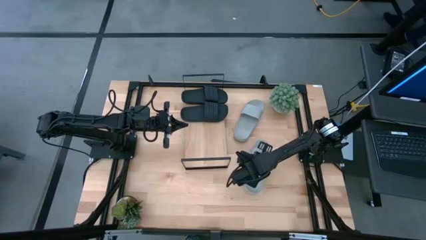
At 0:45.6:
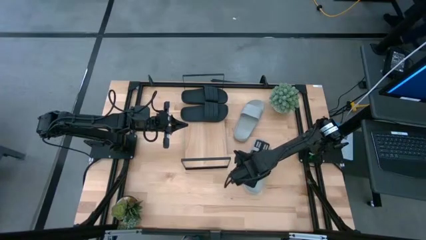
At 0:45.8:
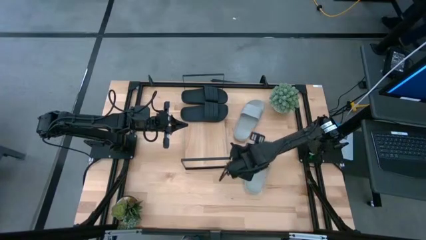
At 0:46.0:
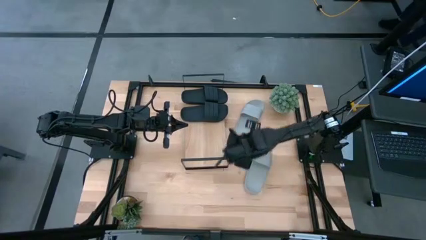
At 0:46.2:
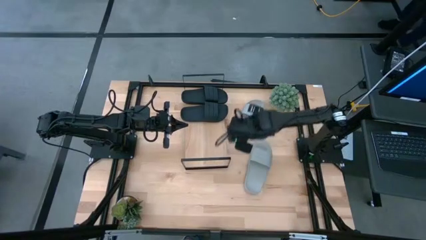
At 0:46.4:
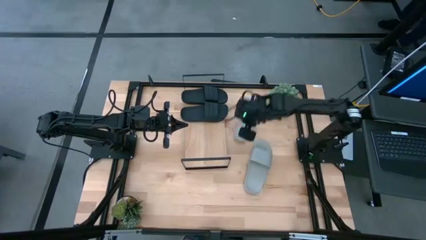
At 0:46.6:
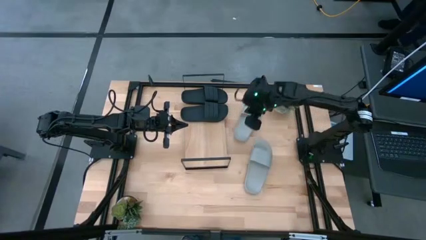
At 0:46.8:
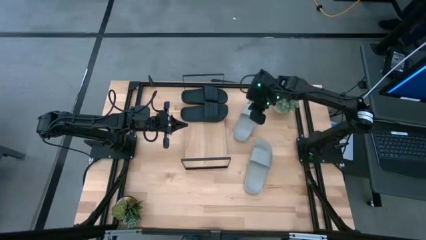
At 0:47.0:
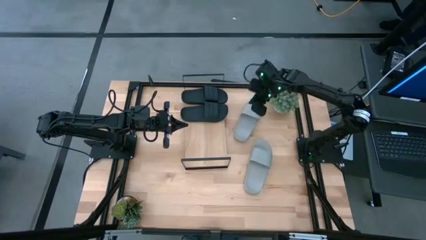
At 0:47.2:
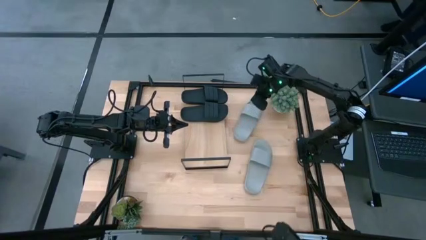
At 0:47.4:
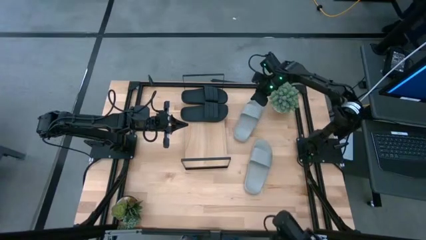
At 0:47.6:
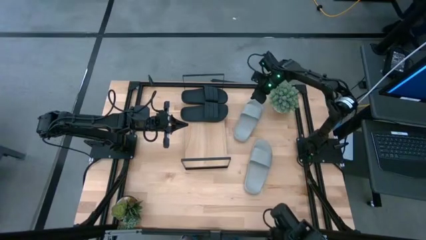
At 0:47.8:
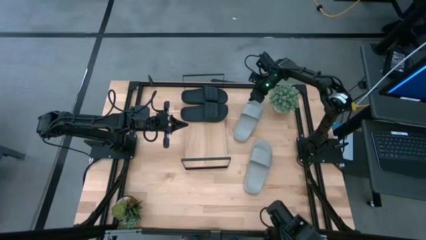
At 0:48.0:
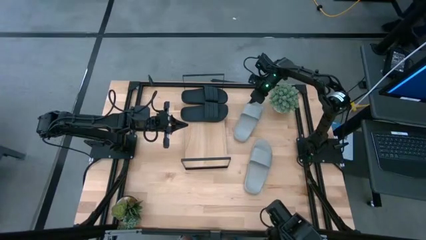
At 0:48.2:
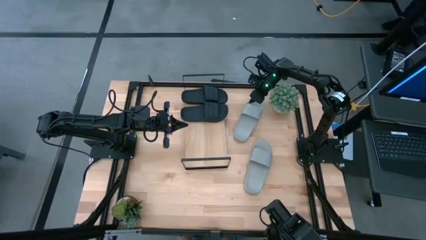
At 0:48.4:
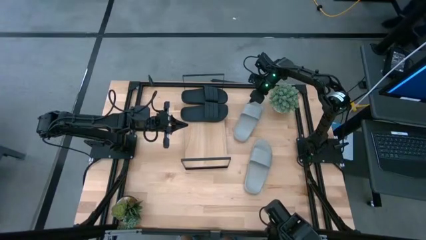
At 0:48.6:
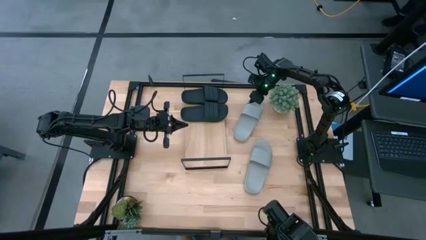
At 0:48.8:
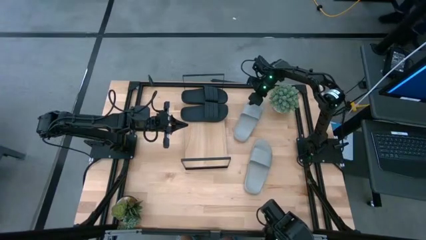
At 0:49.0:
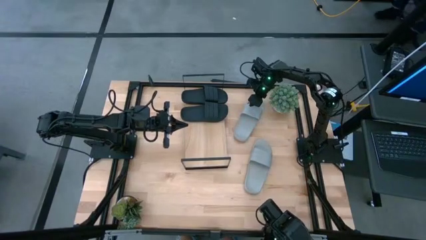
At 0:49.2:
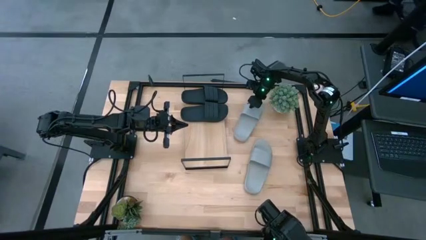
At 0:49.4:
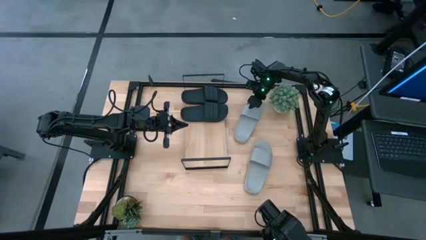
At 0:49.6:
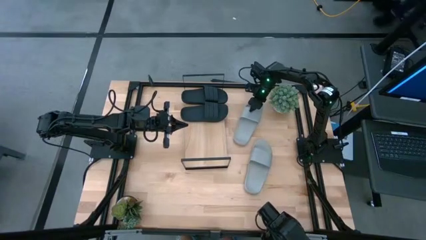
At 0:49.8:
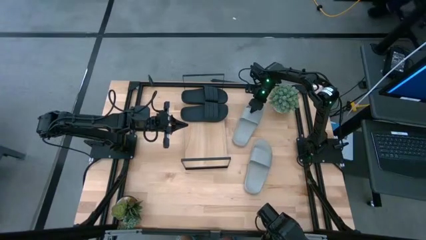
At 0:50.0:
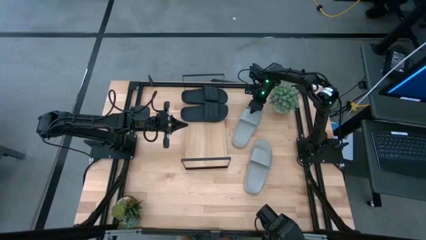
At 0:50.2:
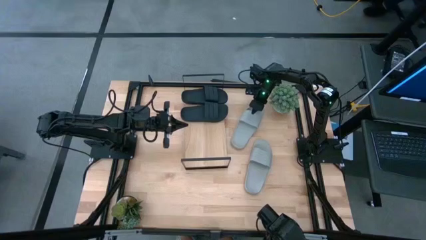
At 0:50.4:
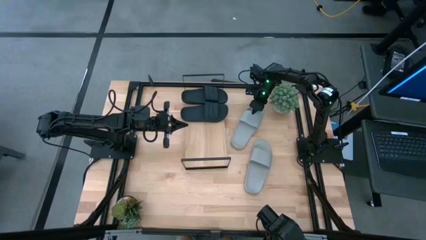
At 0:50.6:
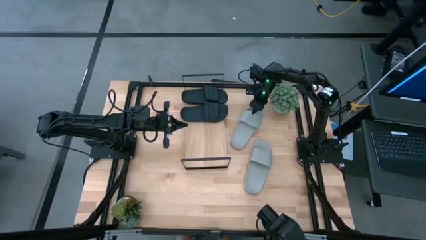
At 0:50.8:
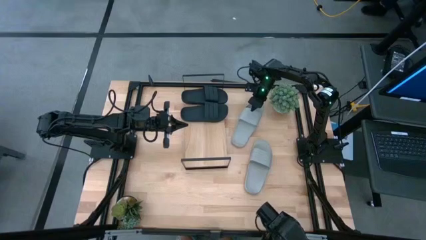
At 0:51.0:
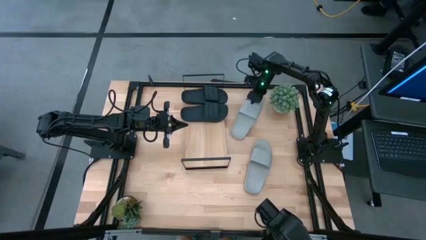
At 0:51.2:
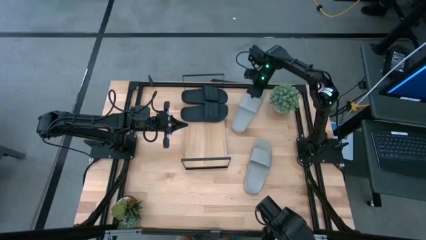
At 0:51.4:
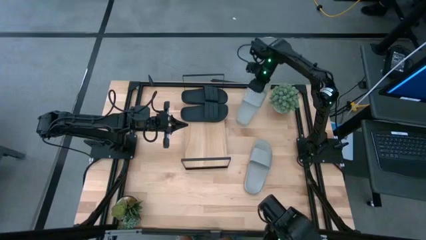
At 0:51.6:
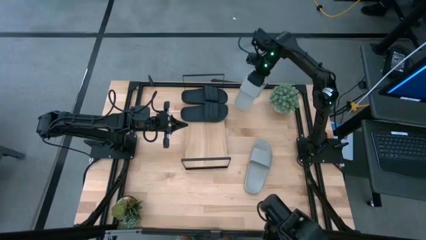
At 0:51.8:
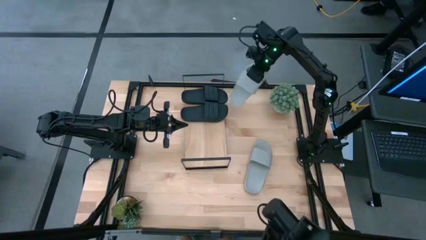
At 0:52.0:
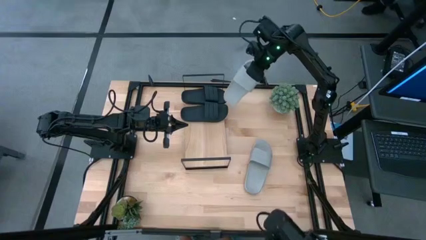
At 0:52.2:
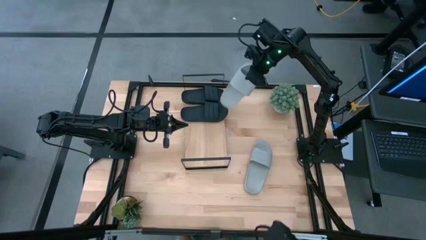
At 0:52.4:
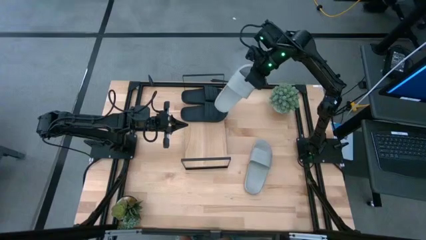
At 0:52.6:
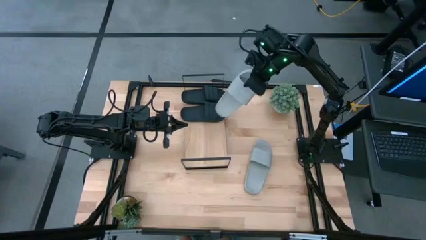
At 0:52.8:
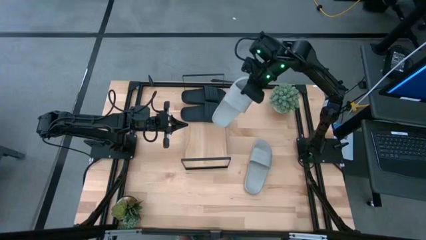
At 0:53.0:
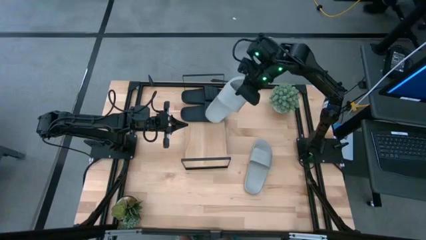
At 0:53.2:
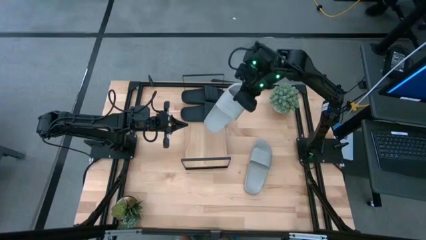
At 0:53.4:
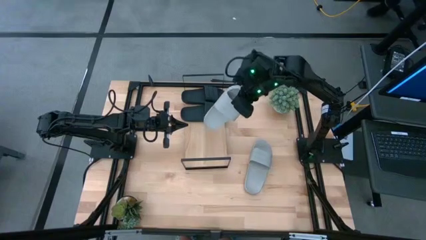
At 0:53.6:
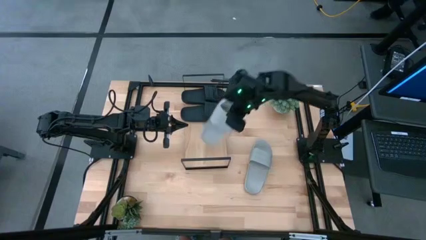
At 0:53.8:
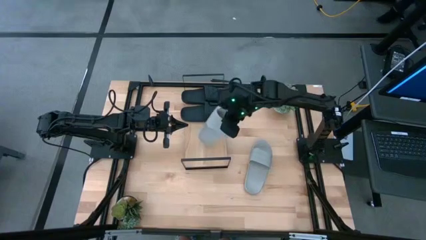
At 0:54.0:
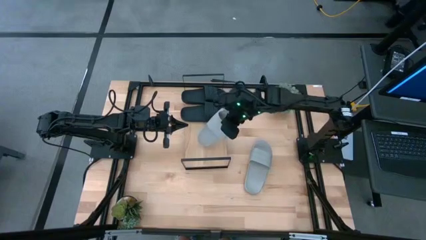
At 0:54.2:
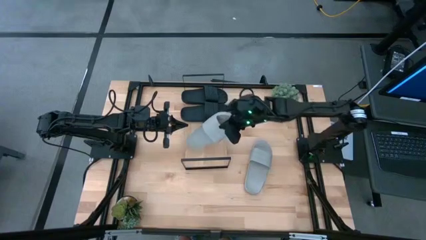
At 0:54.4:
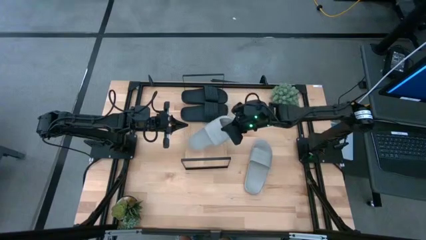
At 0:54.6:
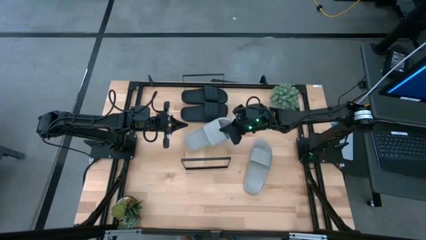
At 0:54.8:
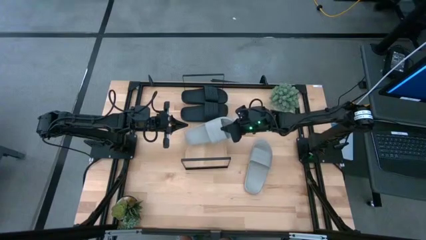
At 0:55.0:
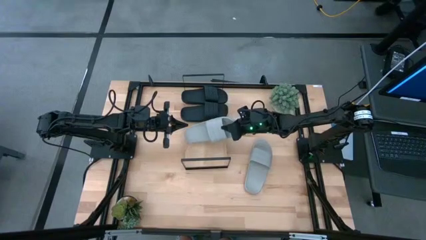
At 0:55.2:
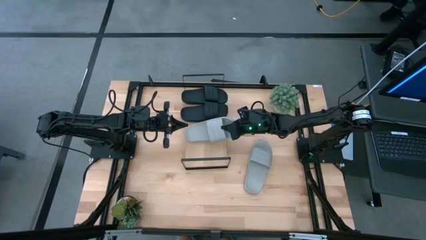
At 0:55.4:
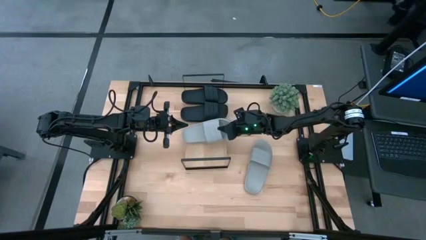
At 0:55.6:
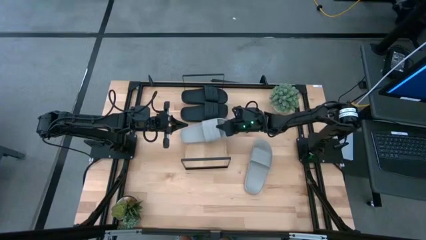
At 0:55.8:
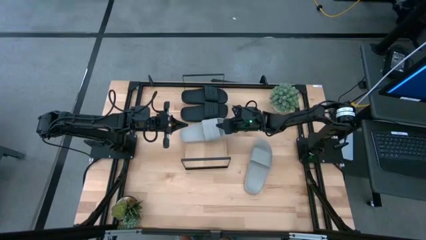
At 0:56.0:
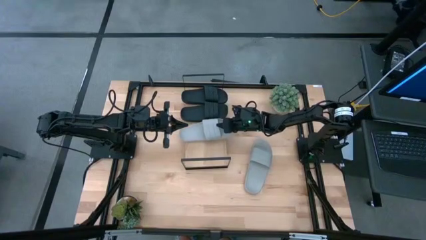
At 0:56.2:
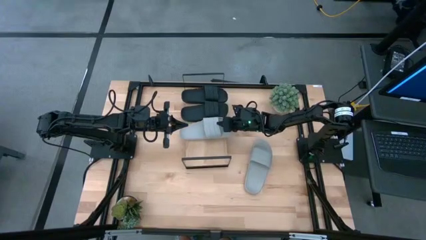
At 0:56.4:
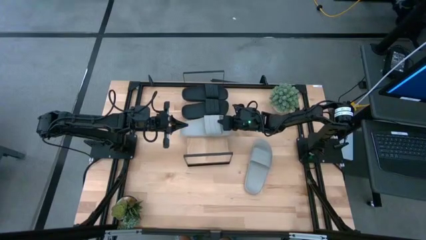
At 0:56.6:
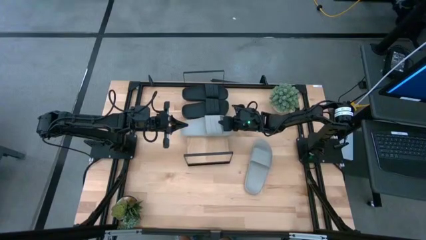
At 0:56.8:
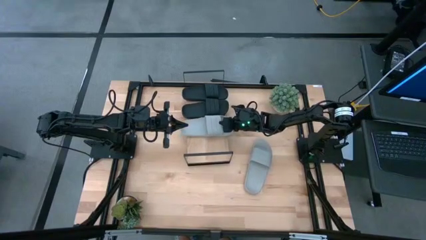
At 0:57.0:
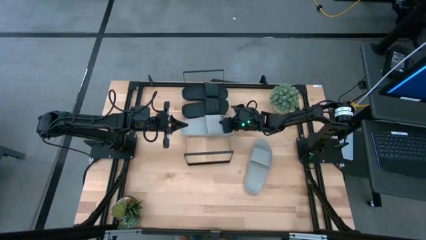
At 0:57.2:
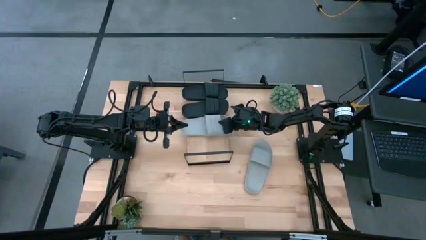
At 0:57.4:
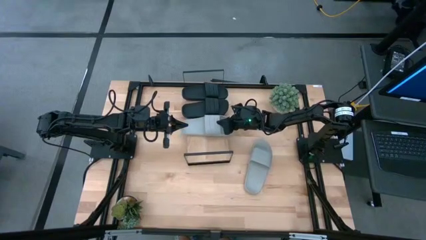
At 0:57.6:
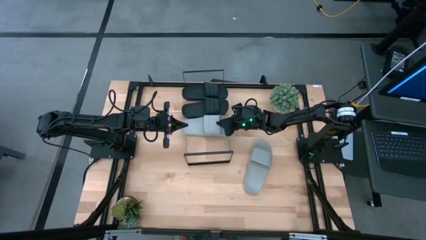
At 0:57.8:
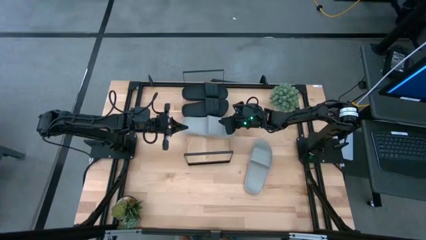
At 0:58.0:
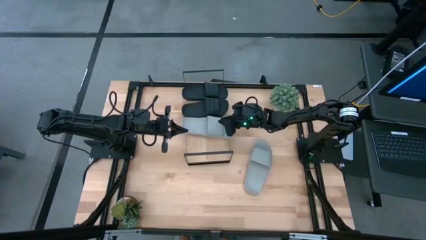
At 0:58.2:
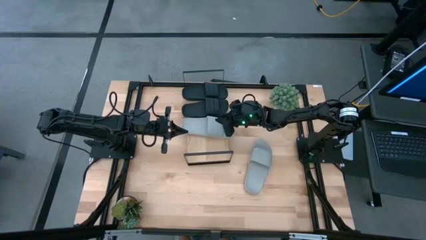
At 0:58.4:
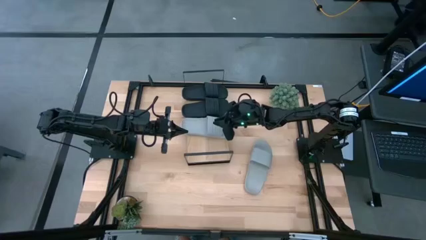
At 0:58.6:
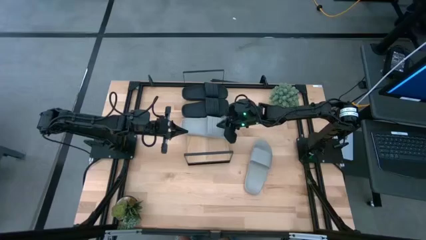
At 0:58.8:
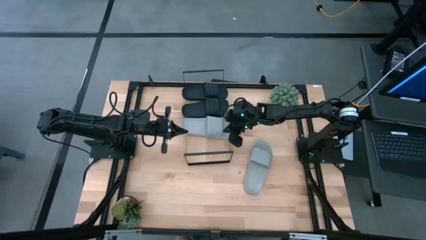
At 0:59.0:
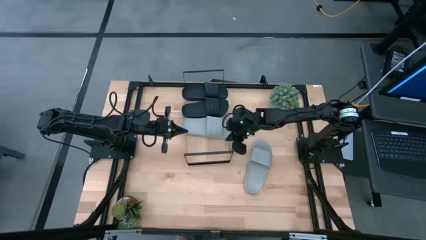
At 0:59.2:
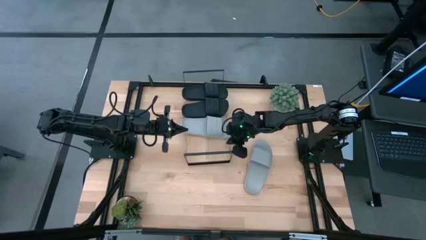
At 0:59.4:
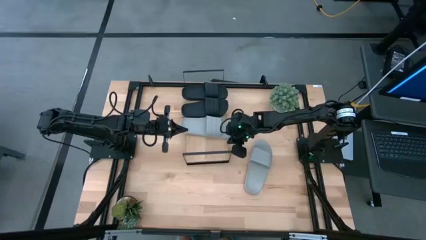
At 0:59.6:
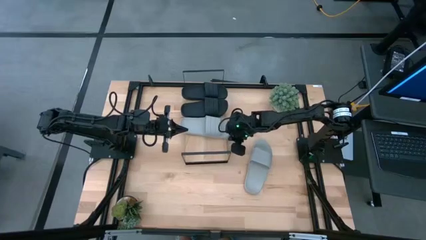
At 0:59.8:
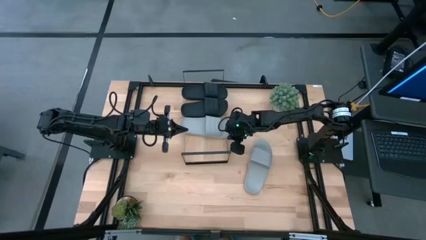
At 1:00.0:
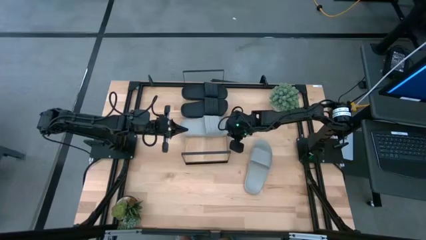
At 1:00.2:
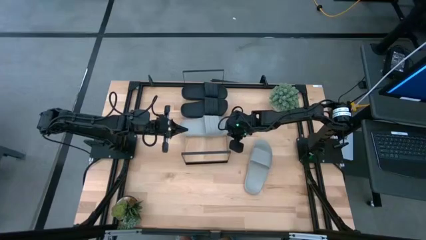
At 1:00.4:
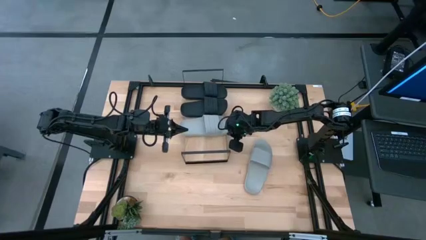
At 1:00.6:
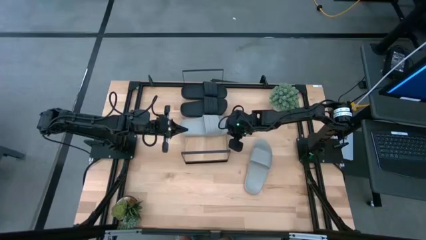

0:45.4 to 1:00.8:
Task: Pick and place slides into the shelf
Put the top gray slides on the shelf
